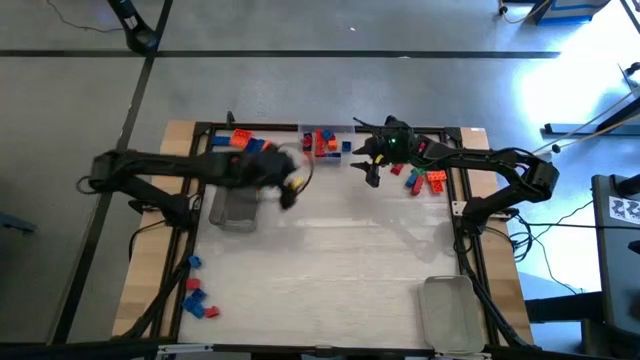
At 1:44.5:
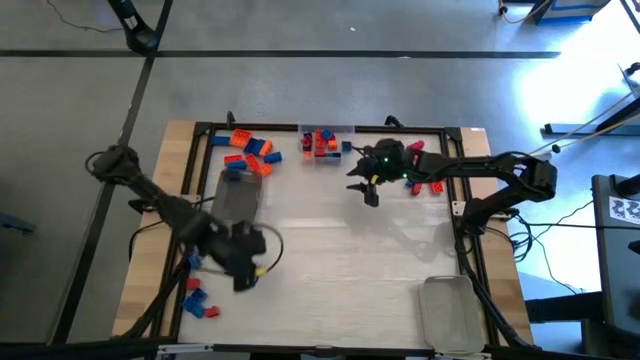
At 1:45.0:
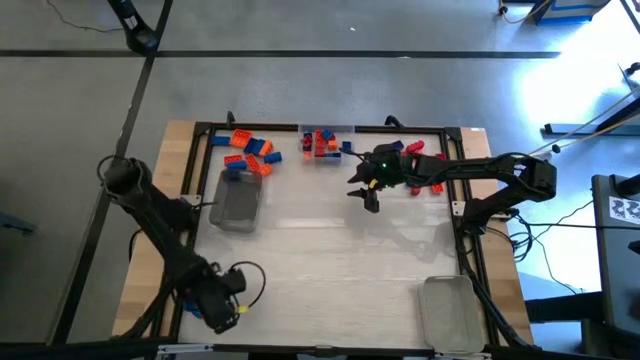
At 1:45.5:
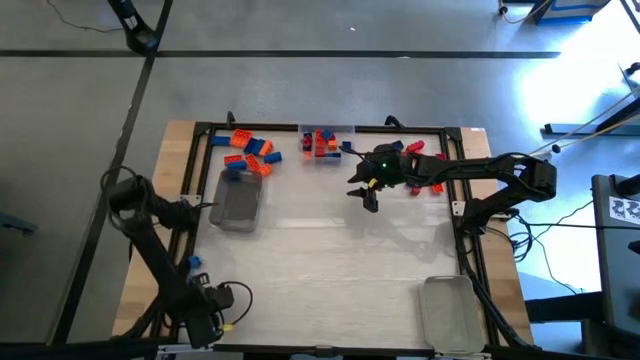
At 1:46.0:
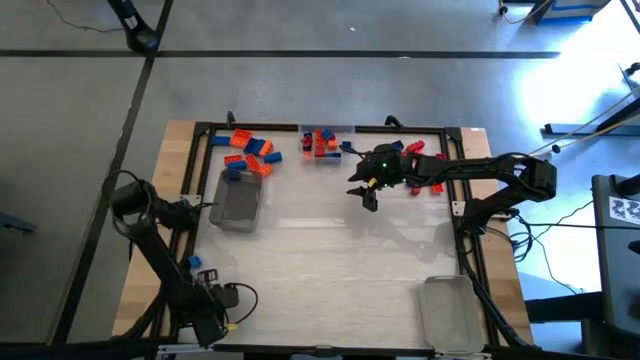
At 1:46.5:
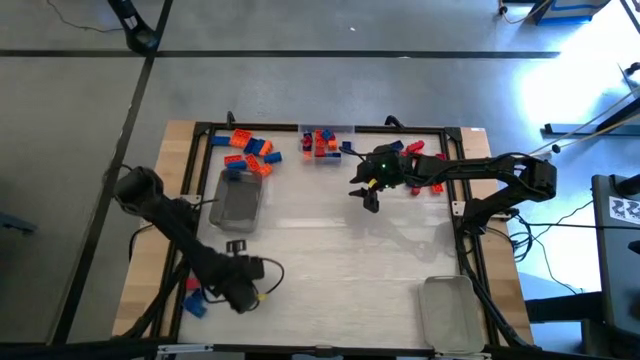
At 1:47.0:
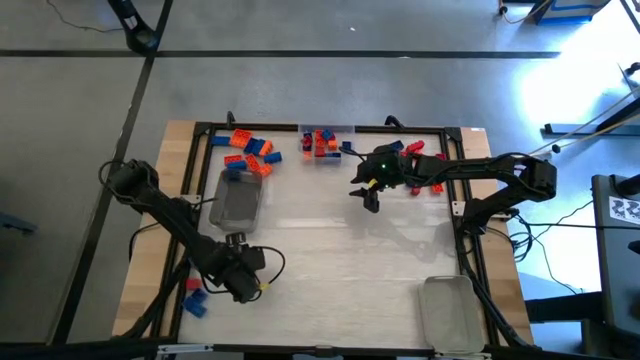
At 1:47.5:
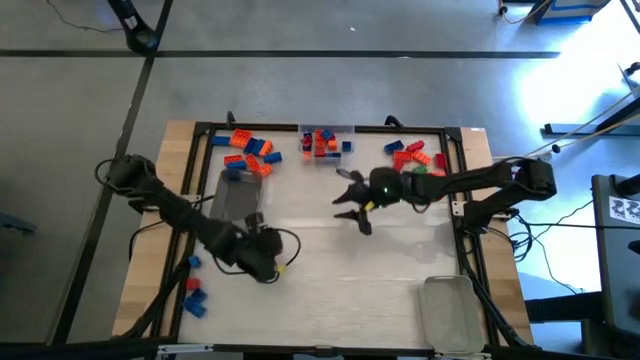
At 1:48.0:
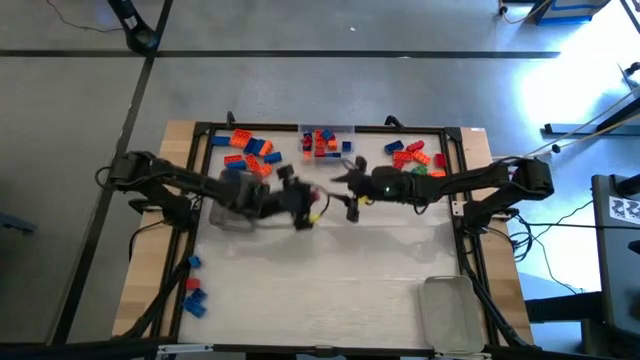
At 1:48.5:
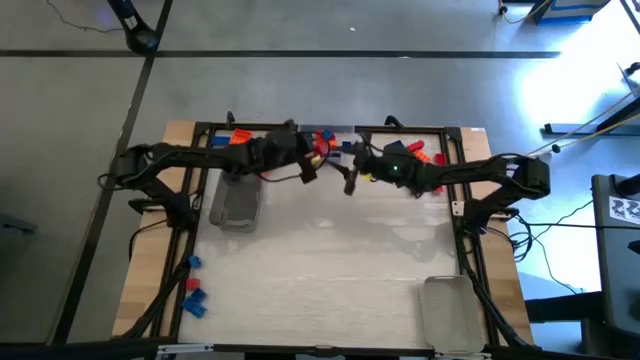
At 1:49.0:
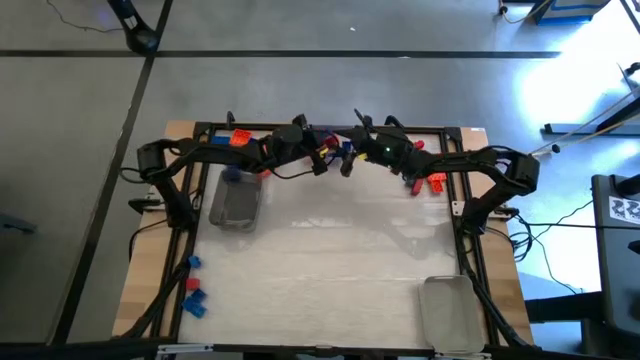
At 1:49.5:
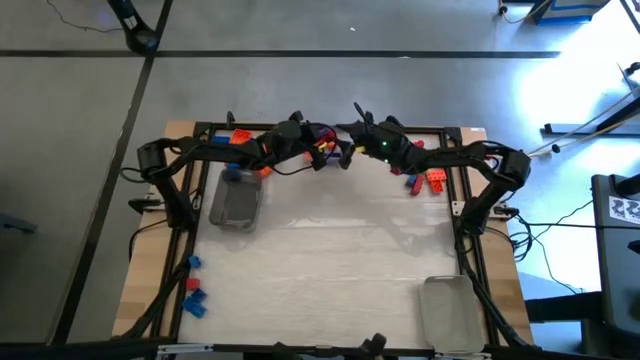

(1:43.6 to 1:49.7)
Task: Sort blocks by size
Put the red 4 stud game piece into the transparent bin

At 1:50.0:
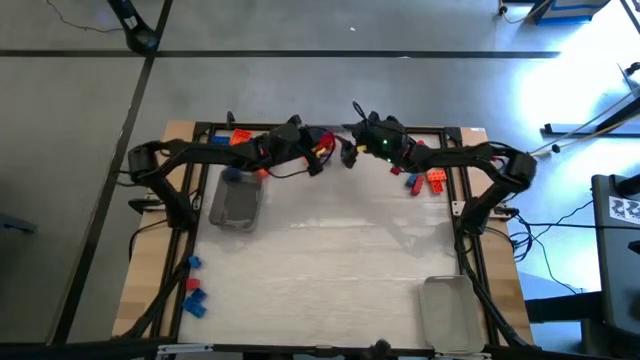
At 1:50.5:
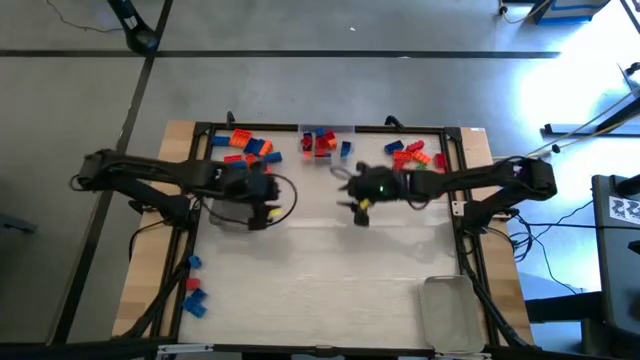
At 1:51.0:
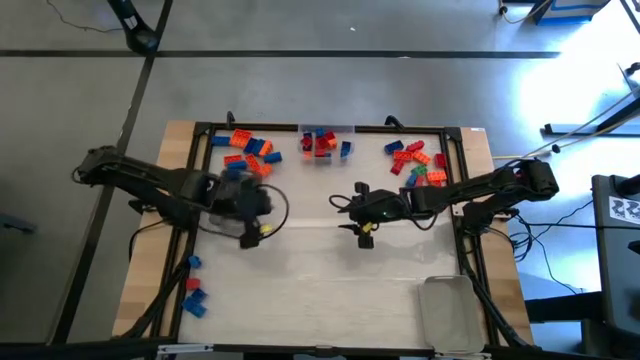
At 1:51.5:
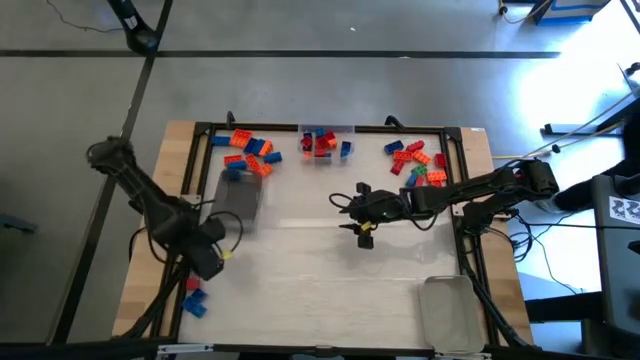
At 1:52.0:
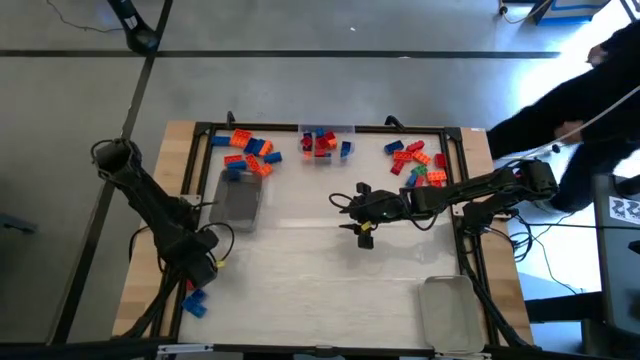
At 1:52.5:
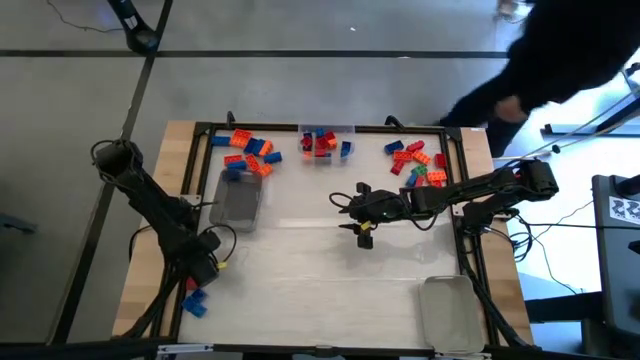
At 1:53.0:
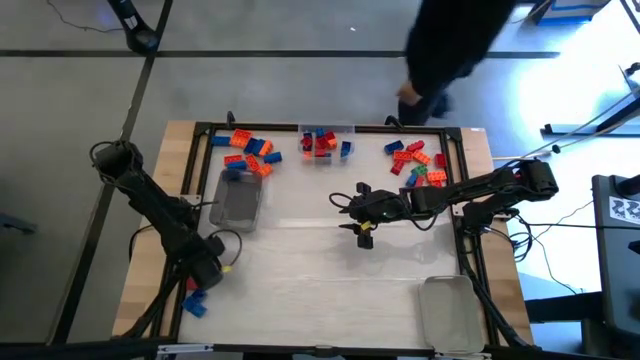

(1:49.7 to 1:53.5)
Put the blue 4 stud game piece into the transparent bin

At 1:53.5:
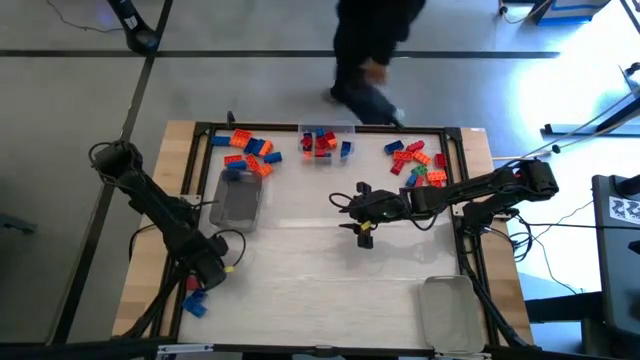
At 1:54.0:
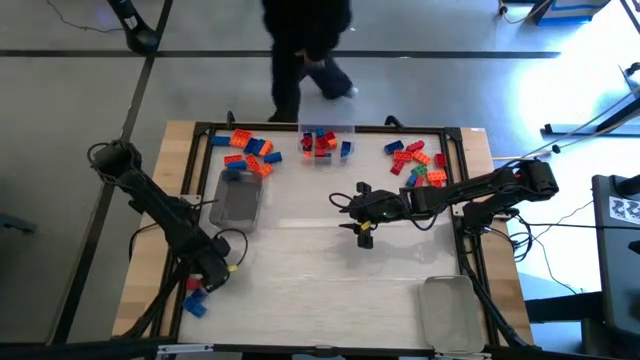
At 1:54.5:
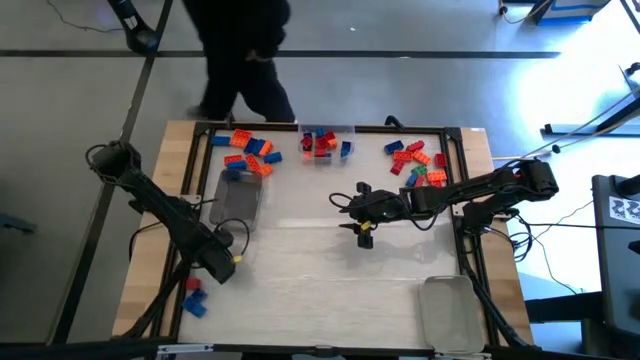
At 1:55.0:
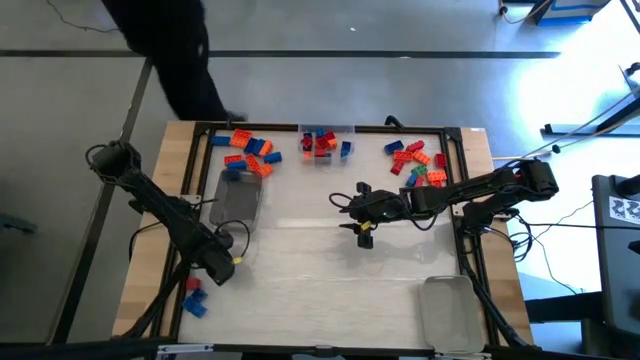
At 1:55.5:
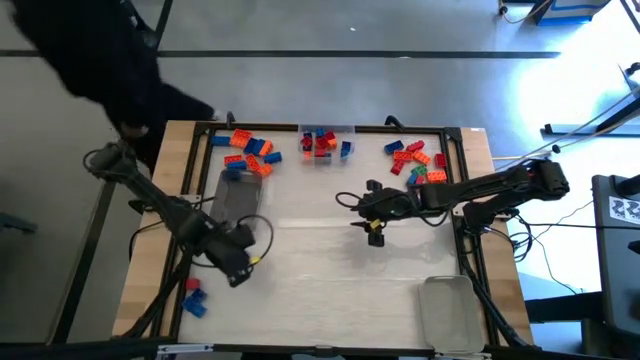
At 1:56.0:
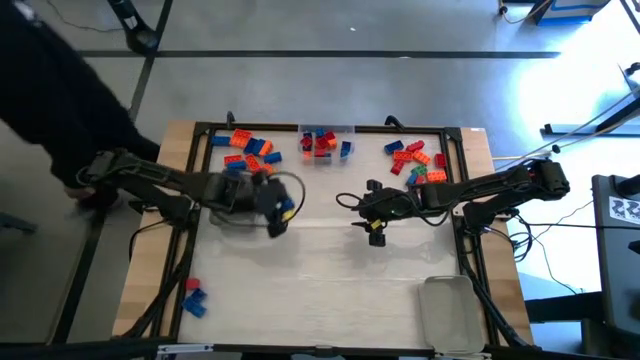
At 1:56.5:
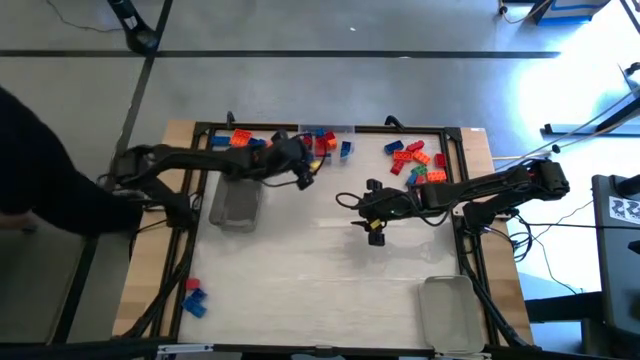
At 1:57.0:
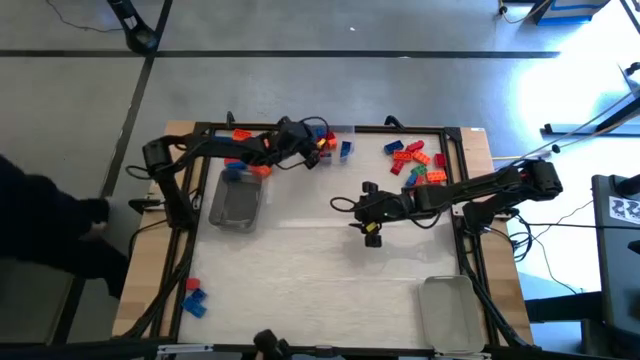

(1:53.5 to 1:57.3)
Put the blue 4 stud game piece into the transparent bin

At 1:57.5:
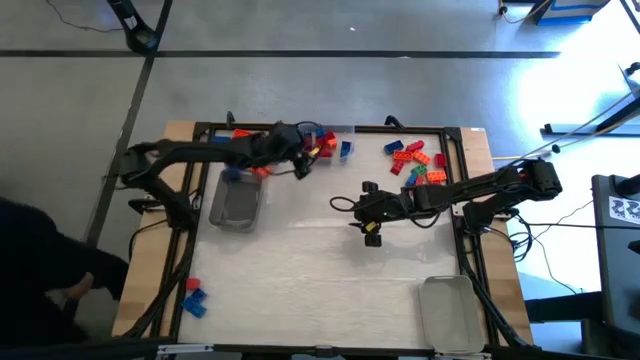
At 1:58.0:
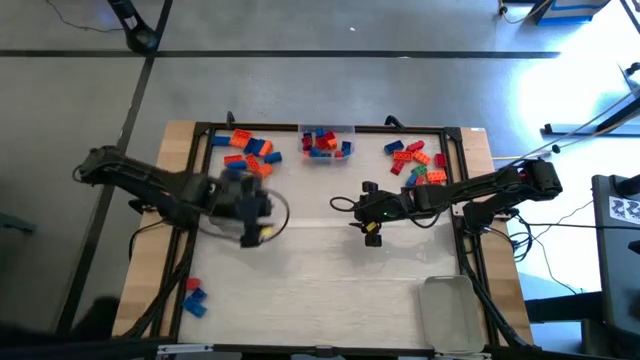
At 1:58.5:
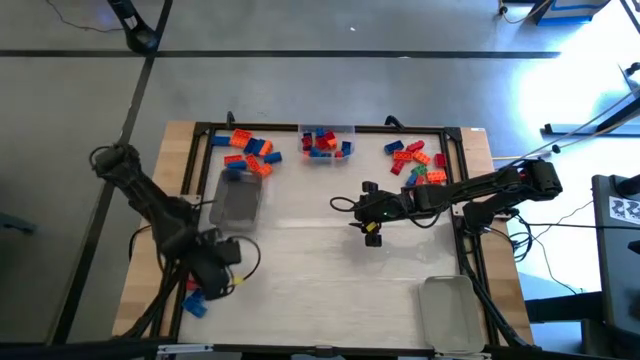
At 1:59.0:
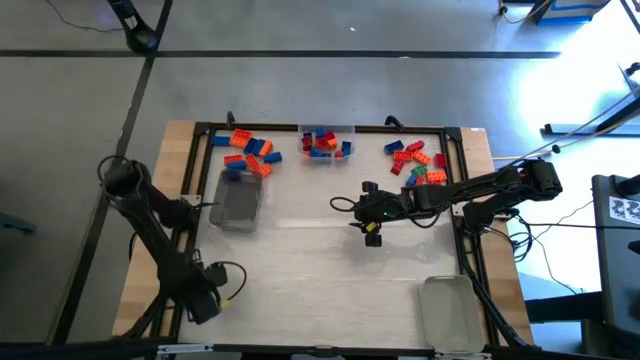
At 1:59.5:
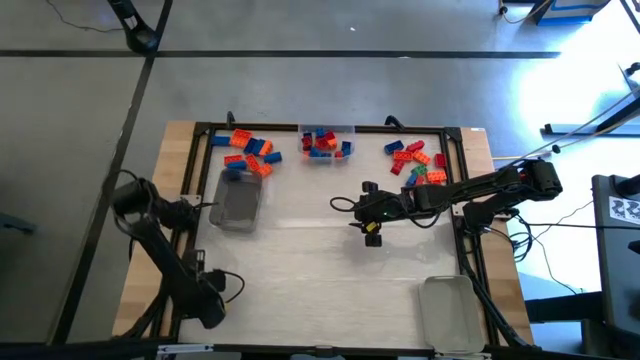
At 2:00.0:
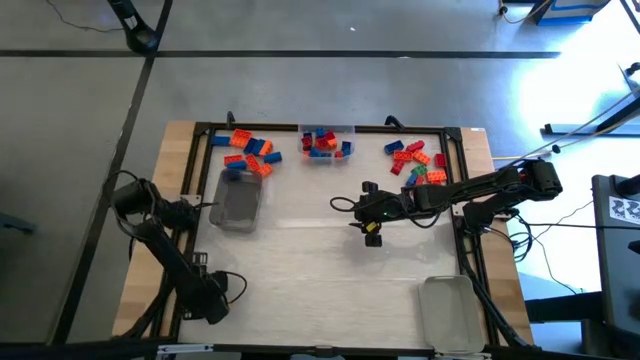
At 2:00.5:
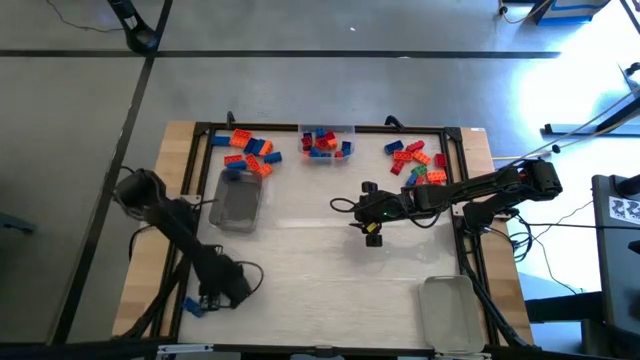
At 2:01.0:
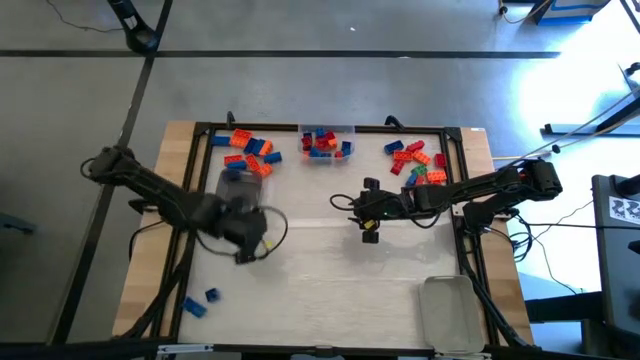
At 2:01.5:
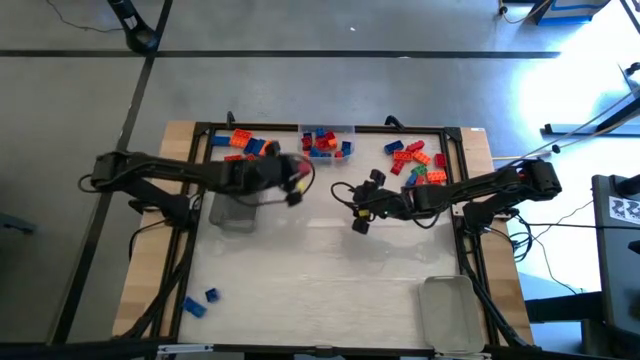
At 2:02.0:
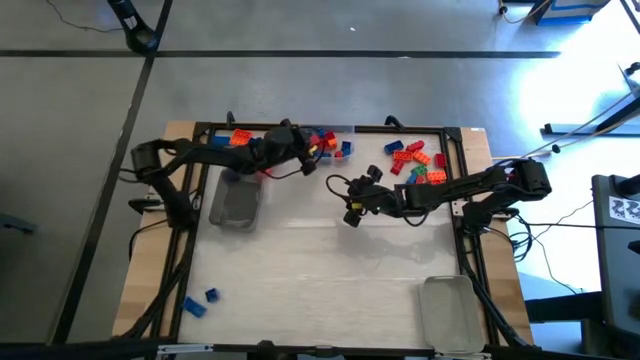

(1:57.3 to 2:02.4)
Put the red block into the transparent bin

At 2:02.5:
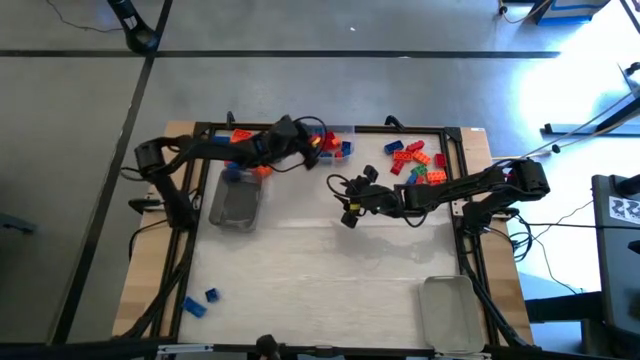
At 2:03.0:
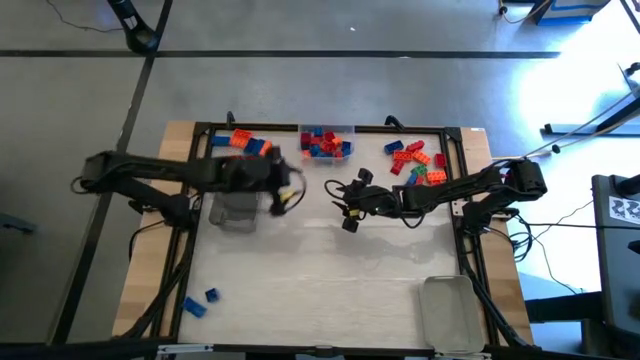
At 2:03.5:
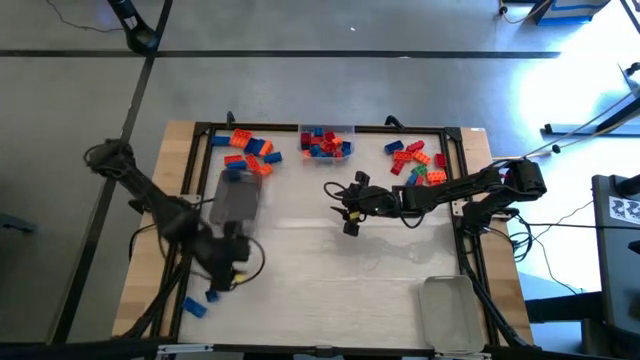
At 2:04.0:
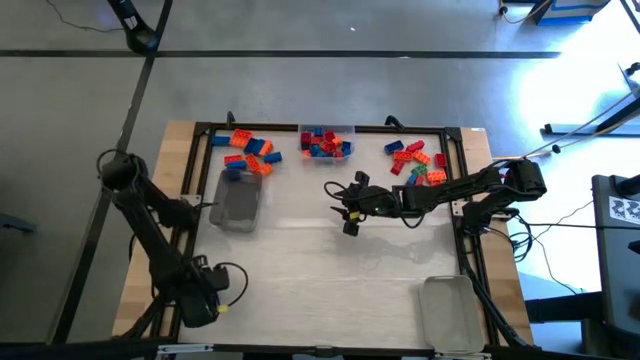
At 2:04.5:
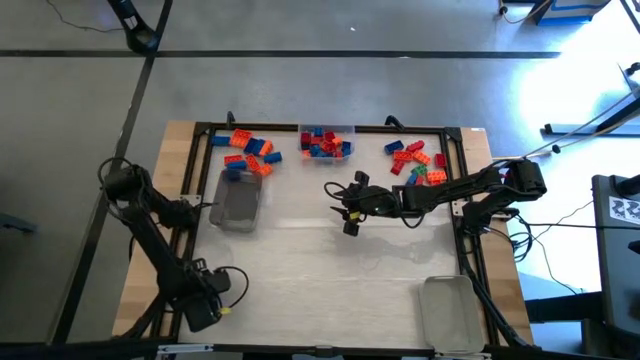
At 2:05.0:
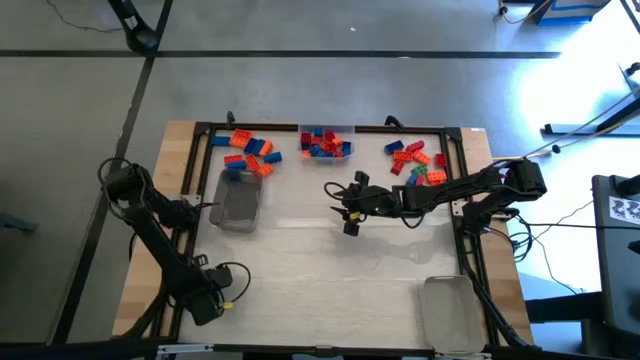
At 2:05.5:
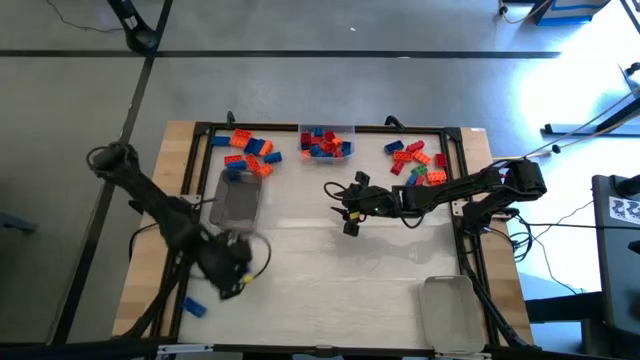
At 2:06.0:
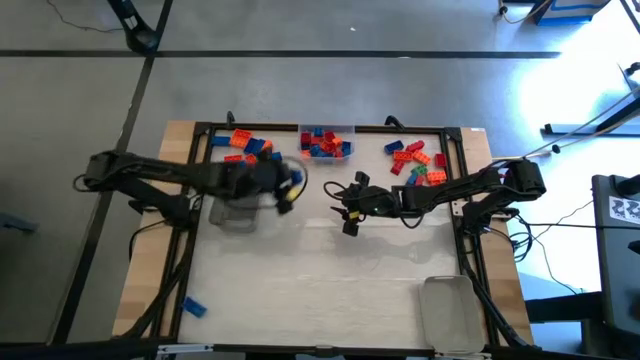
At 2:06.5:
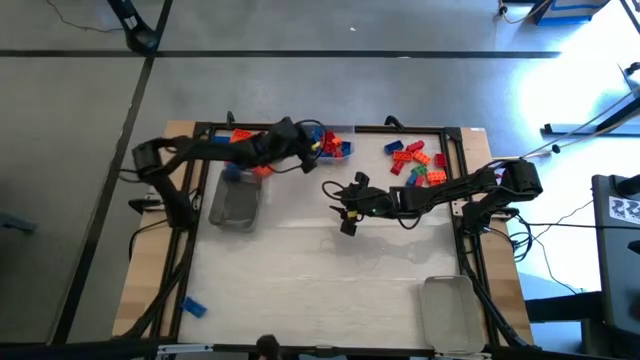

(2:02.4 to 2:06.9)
Put the blue 4 stud game piece into the transparent bin
